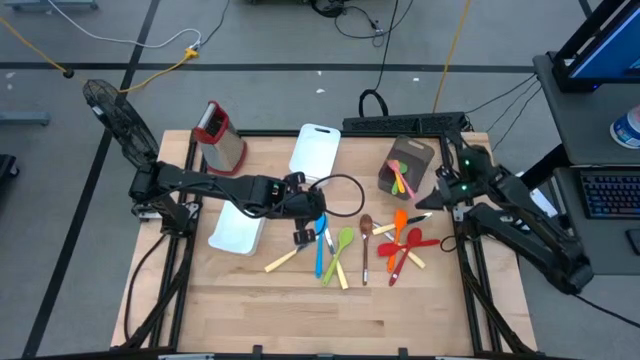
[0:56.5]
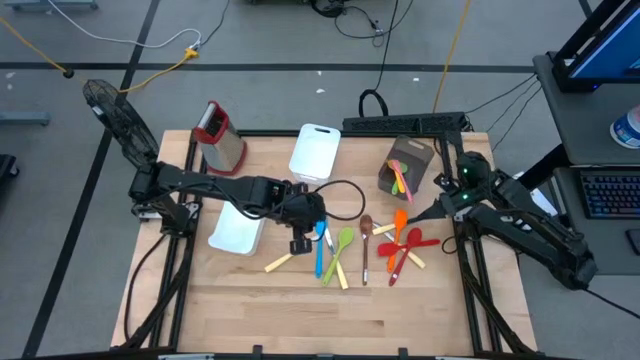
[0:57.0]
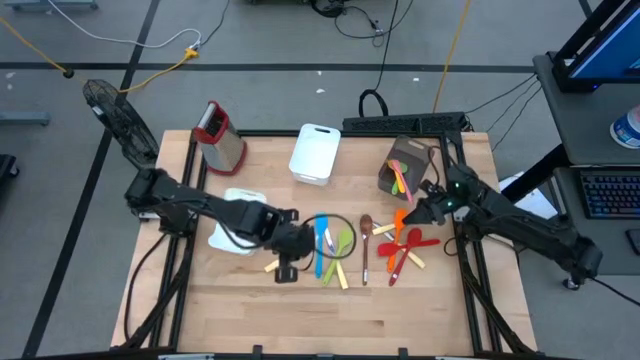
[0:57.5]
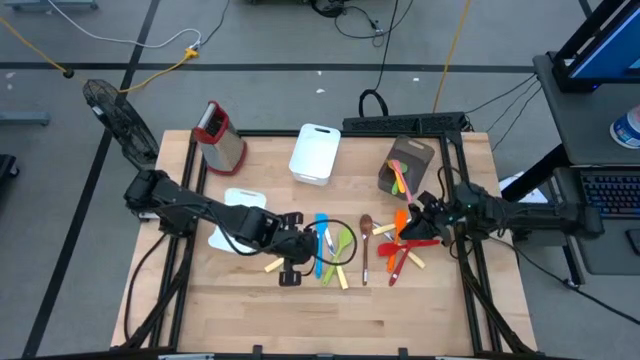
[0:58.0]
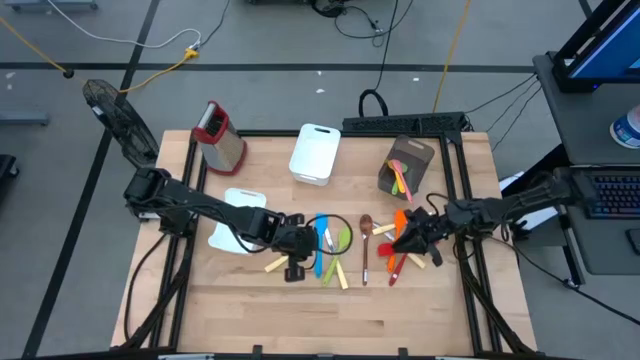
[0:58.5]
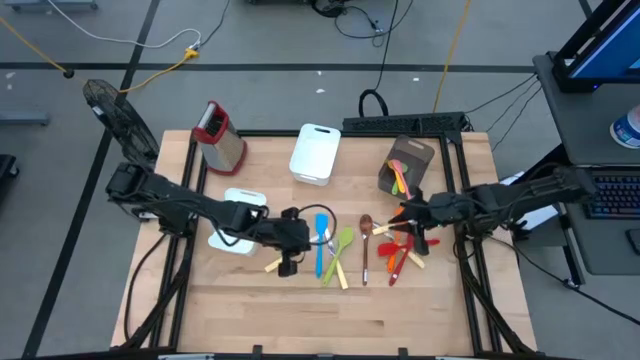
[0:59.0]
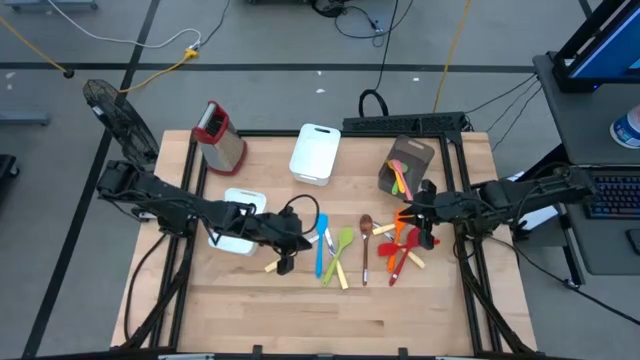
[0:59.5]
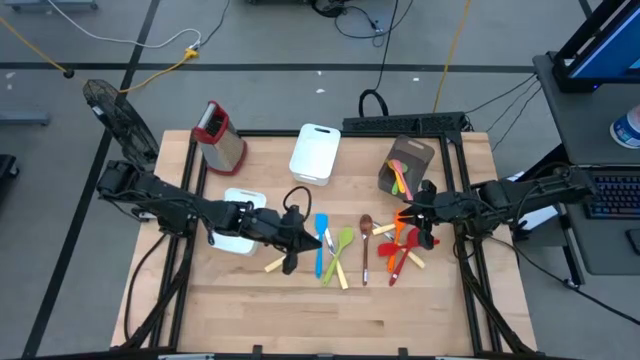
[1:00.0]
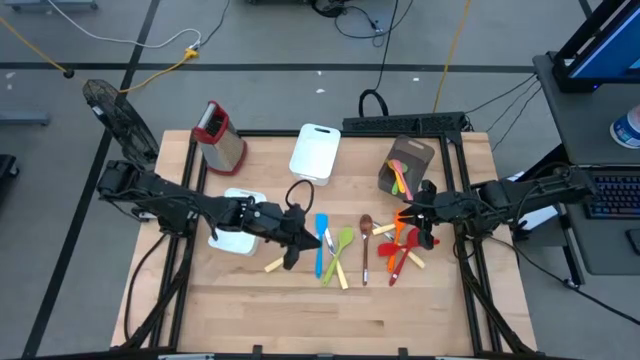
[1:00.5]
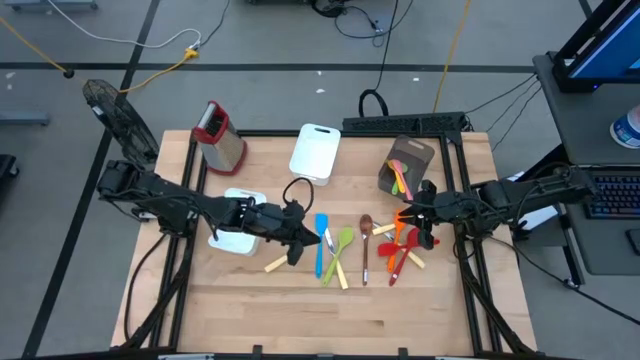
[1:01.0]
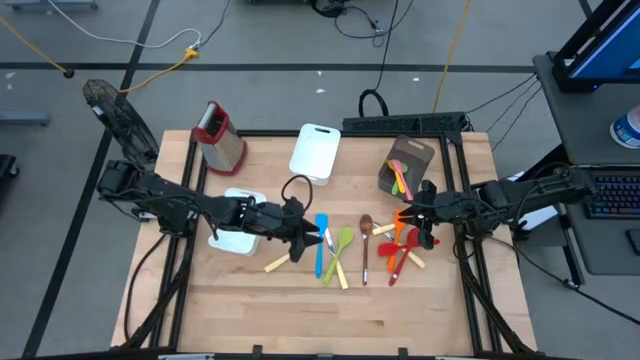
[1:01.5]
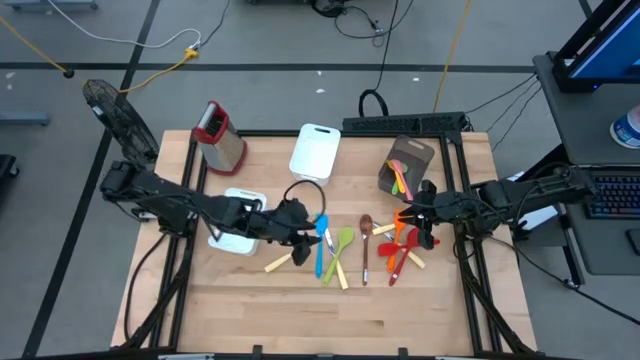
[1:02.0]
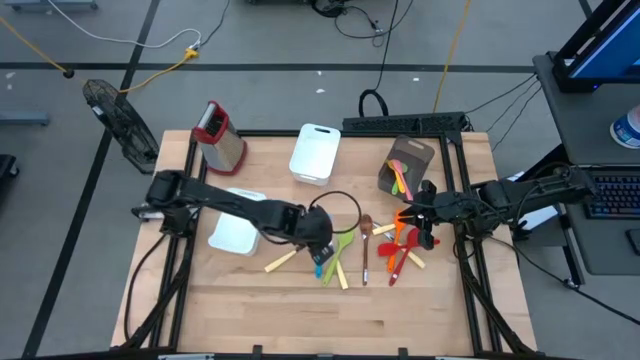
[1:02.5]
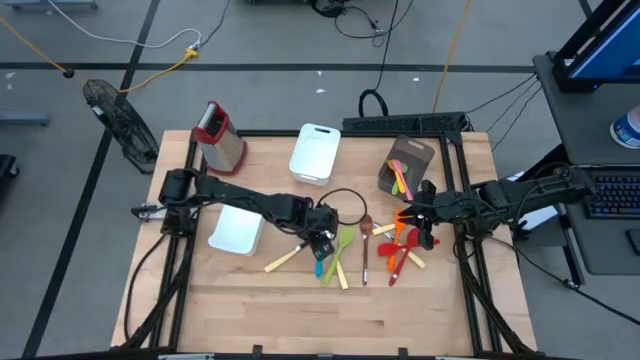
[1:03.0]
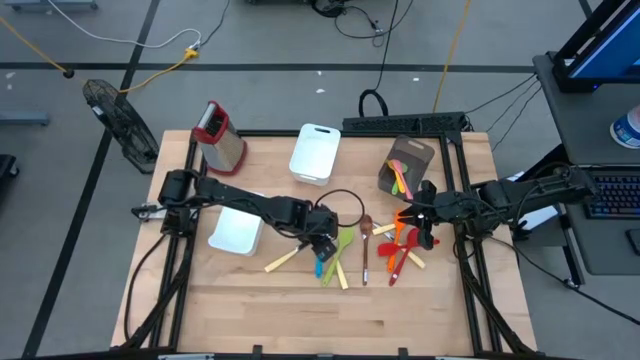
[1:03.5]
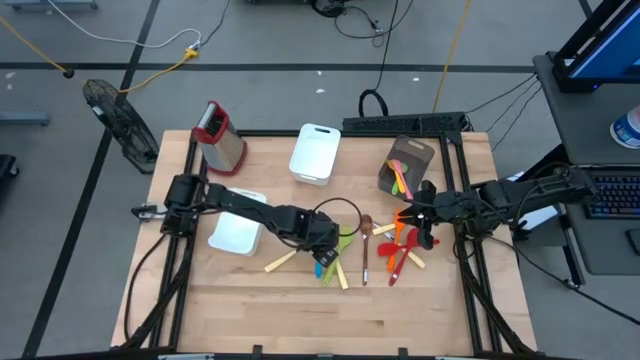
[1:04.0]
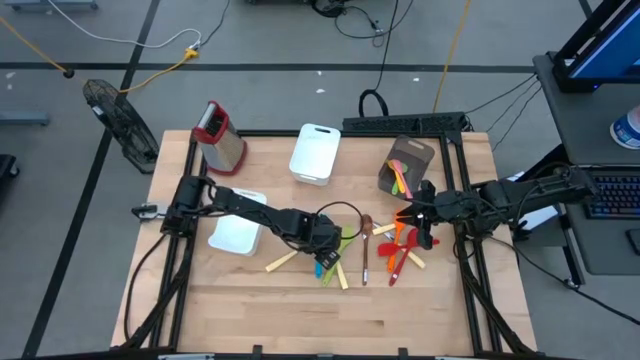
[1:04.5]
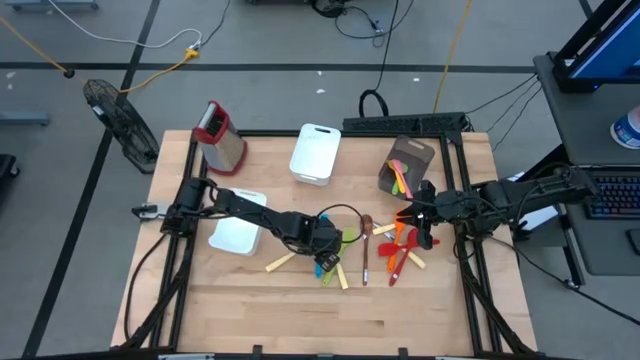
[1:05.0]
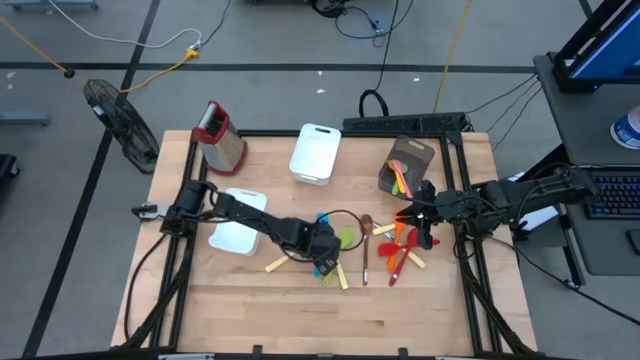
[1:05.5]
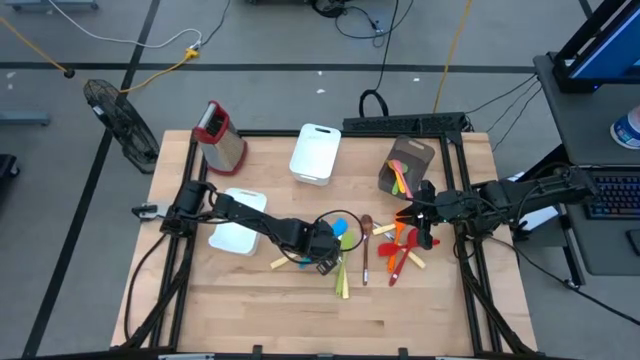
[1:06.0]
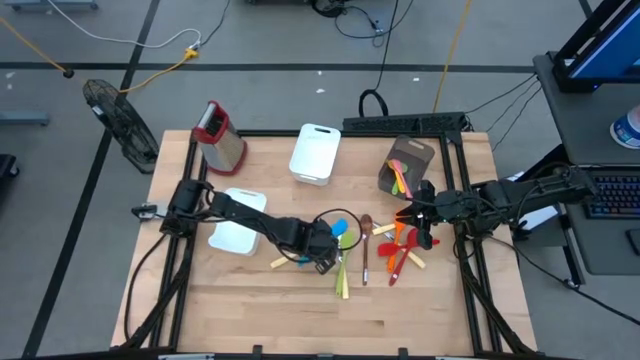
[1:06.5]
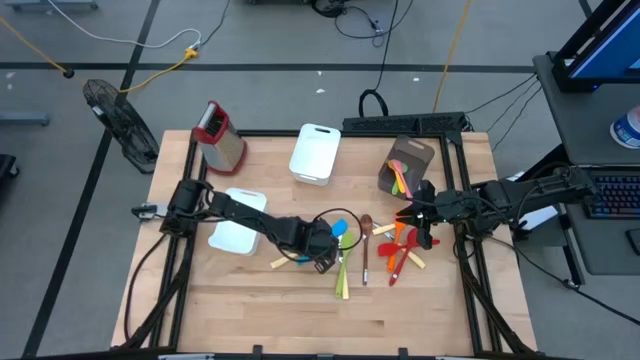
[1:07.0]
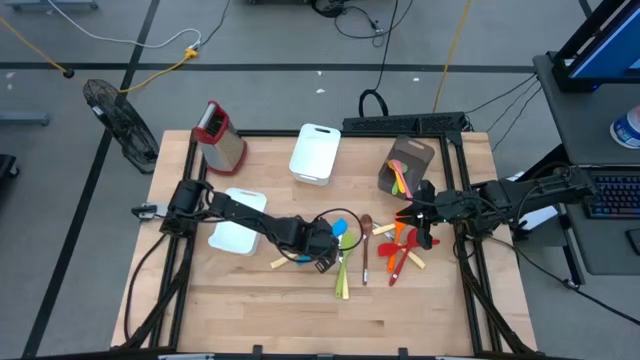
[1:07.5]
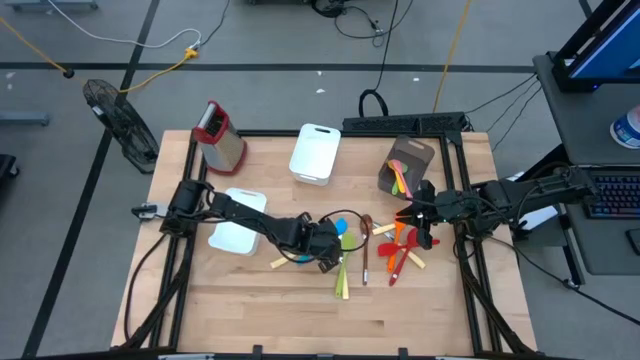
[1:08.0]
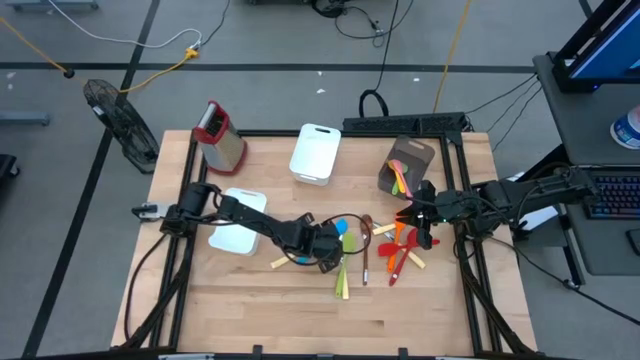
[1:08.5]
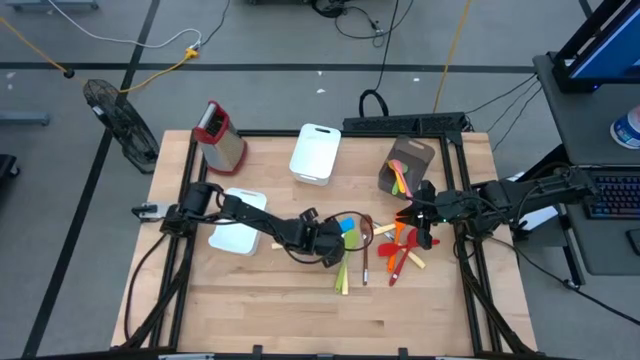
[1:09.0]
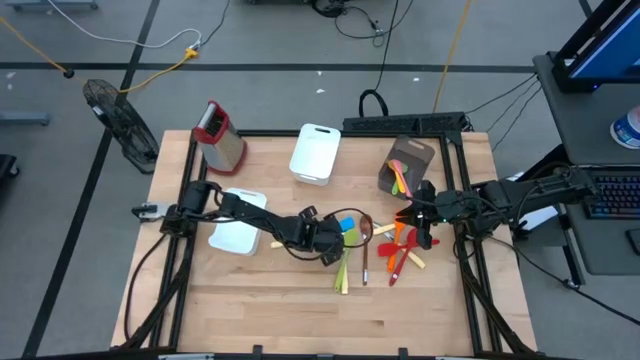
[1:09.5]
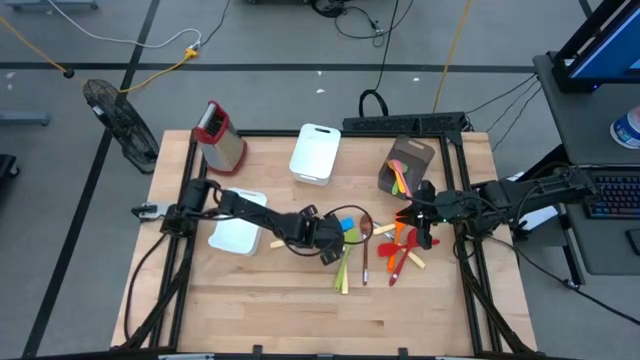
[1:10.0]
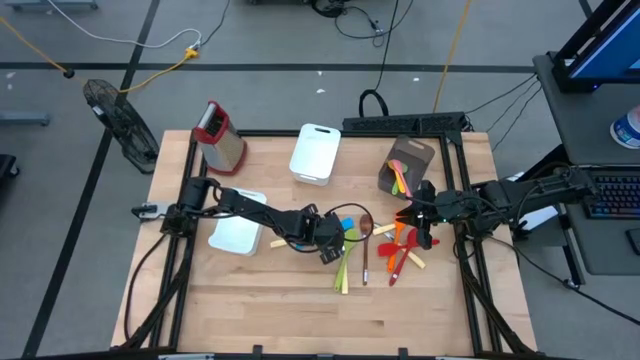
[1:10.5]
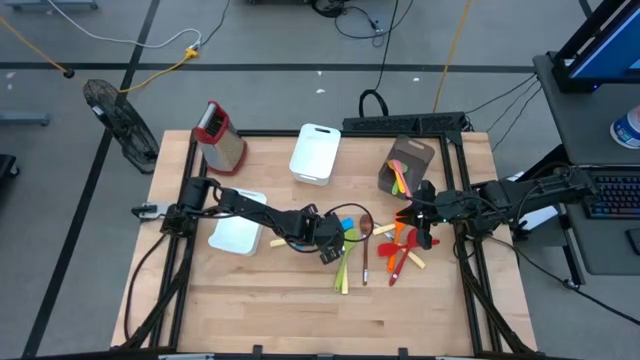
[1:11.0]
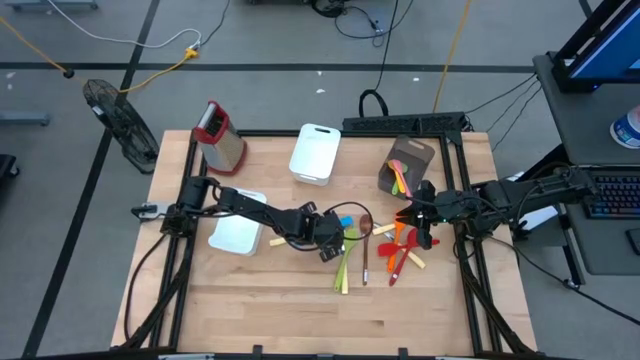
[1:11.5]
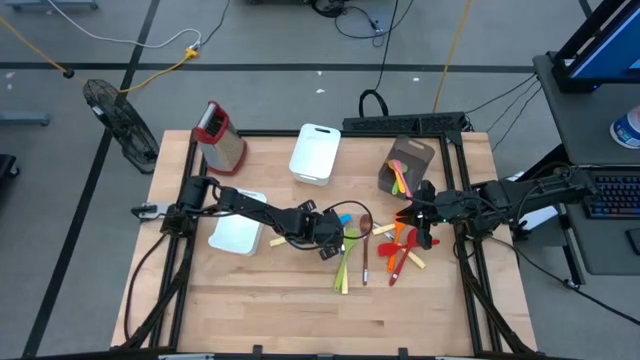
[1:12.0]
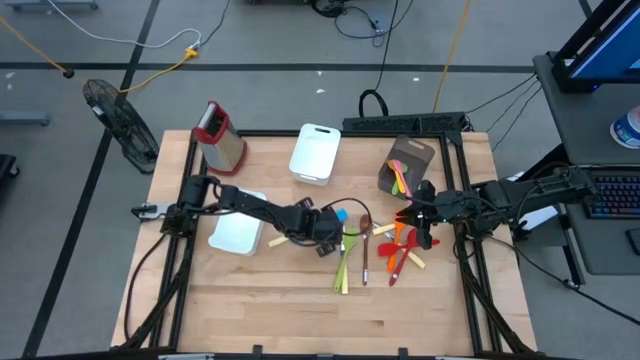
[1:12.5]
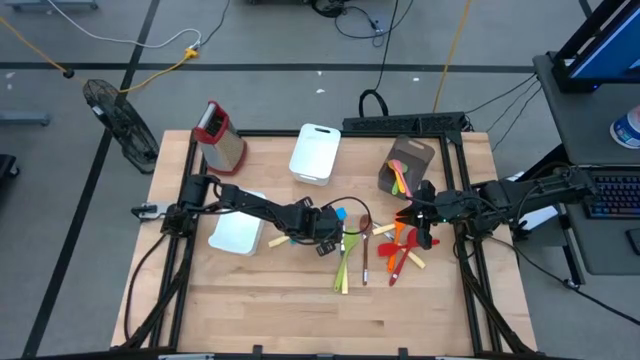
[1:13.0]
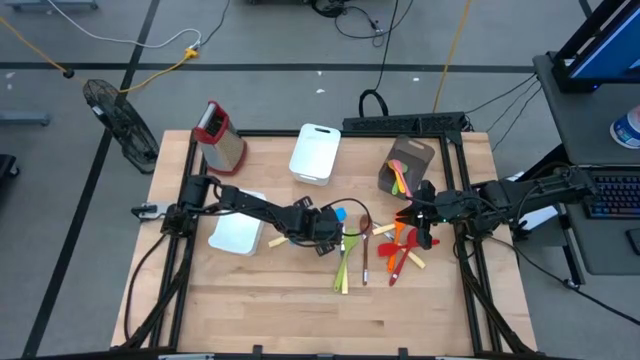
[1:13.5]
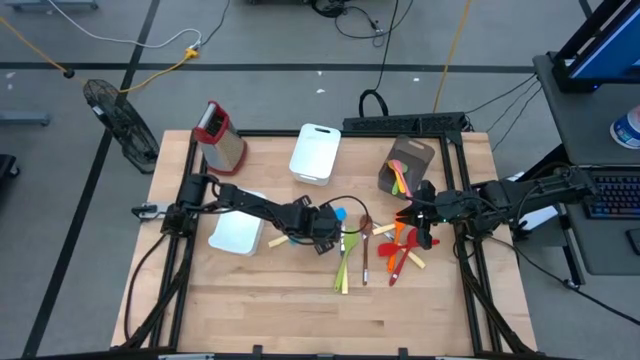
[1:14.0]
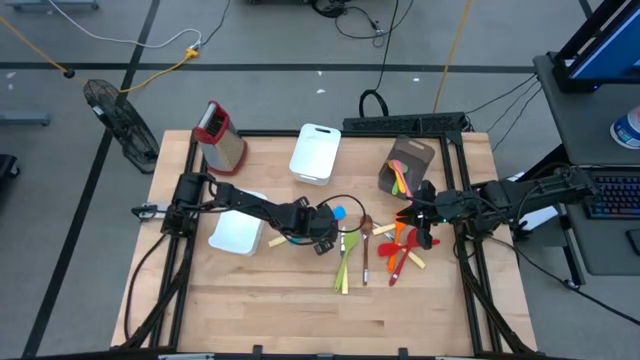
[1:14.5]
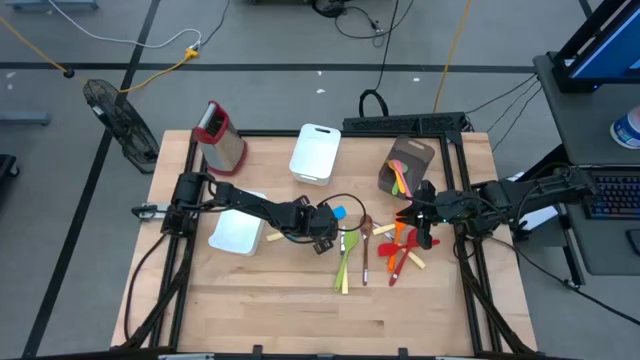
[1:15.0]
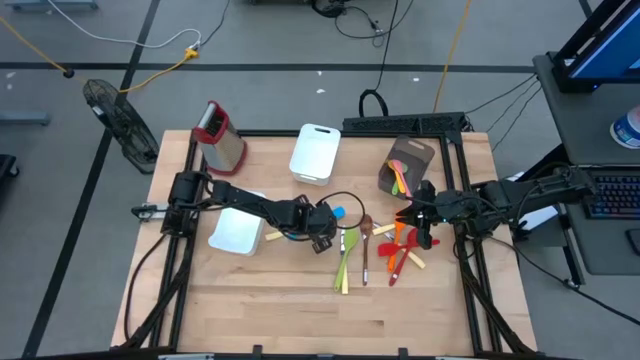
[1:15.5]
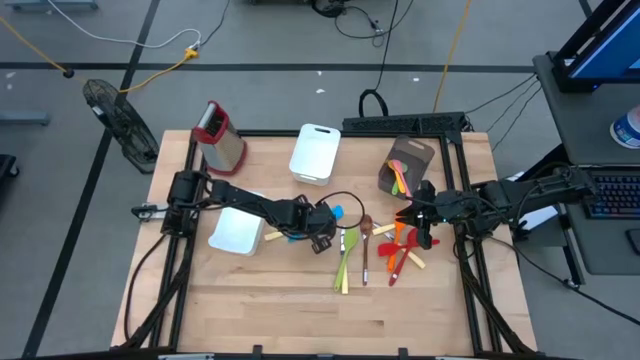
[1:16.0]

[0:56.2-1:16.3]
Task: Pick & Place Kitchen Items
Put the blue spatula into the black bin

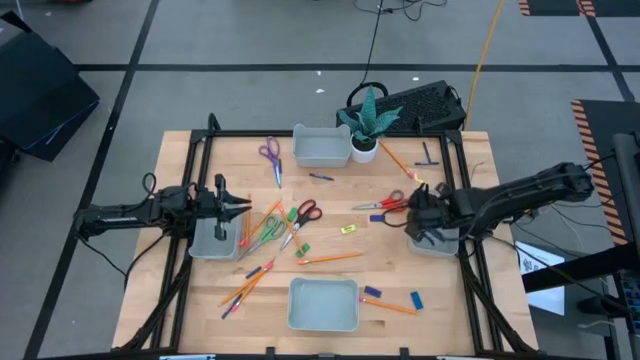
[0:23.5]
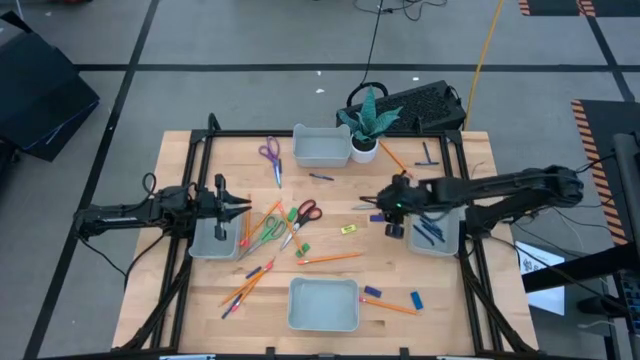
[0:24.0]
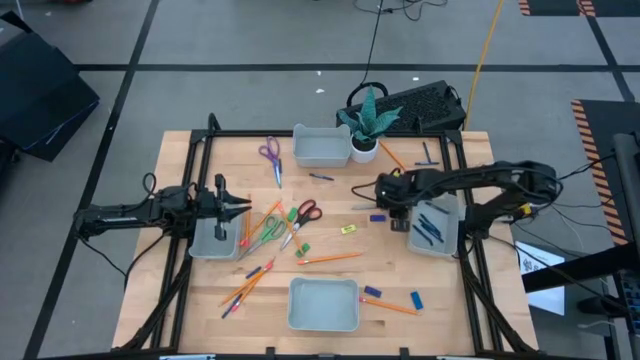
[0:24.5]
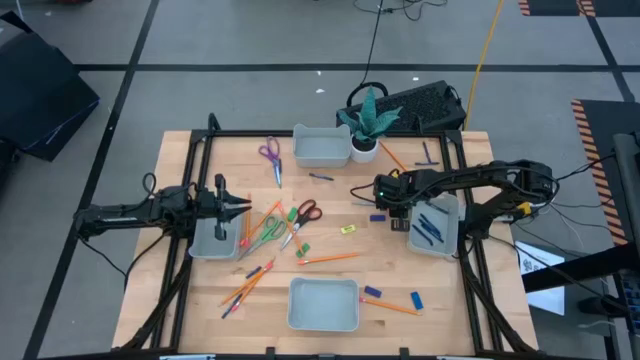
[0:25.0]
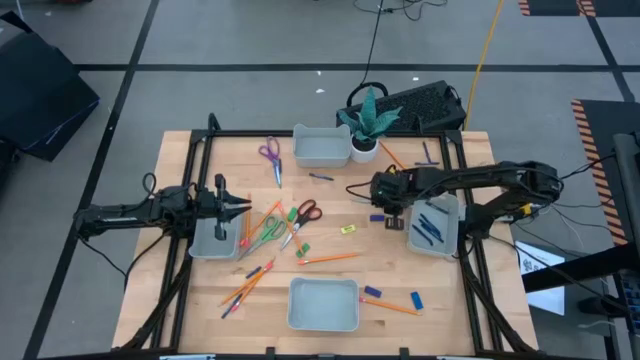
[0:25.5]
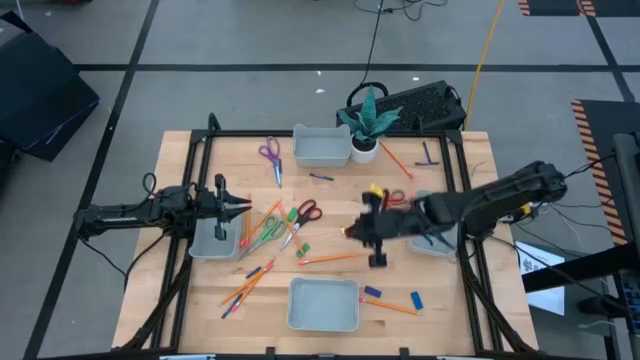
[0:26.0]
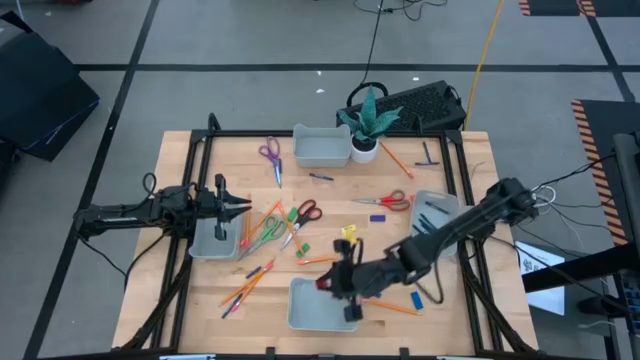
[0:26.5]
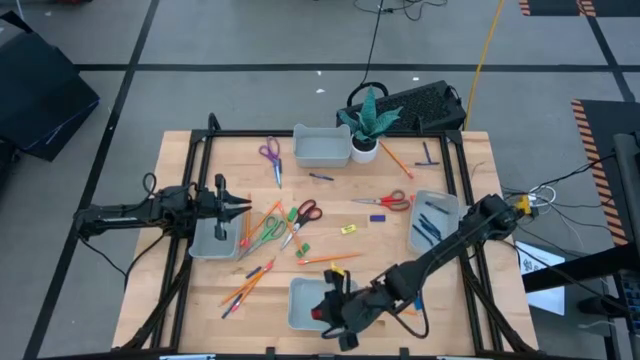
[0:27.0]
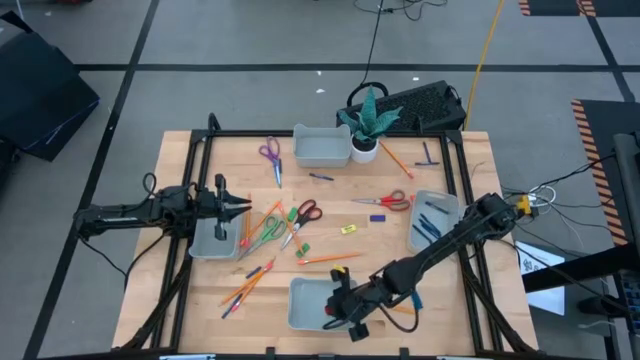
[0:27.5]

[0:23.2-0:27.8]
Task: Sort crayons/erasers/pens/pencils in bins
Put the red eraser into the bottom gray bin
